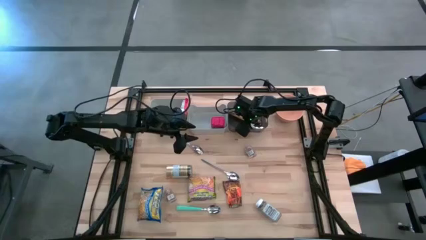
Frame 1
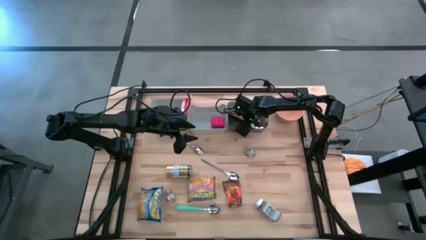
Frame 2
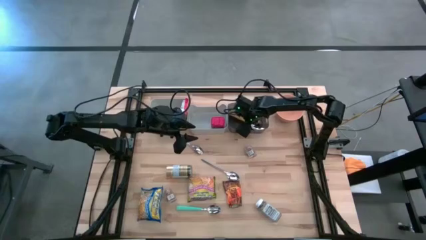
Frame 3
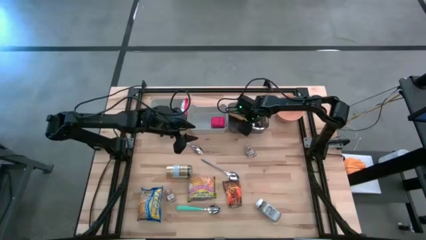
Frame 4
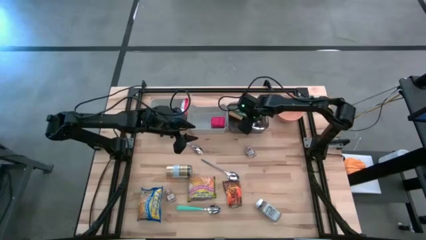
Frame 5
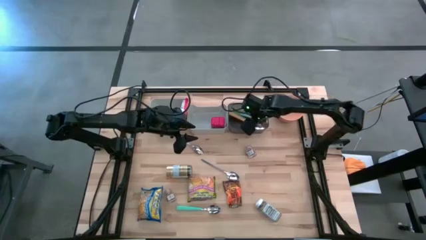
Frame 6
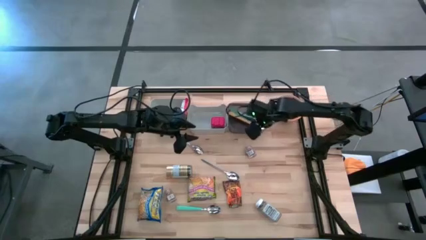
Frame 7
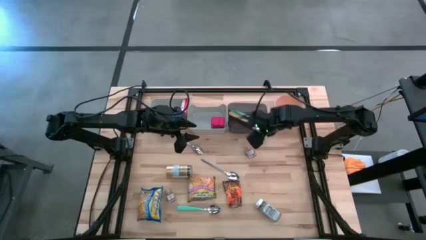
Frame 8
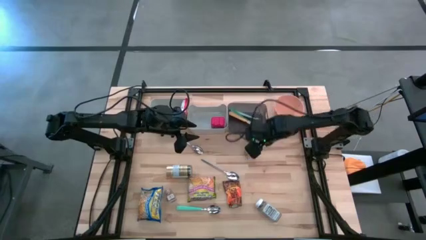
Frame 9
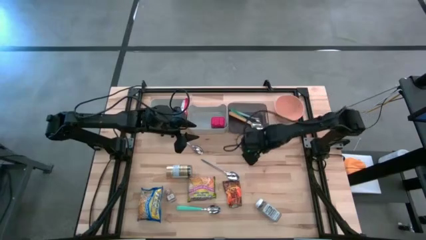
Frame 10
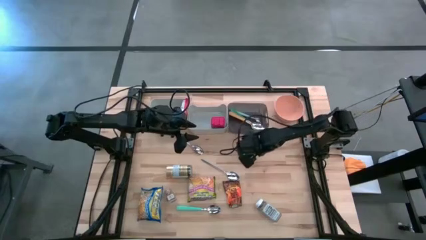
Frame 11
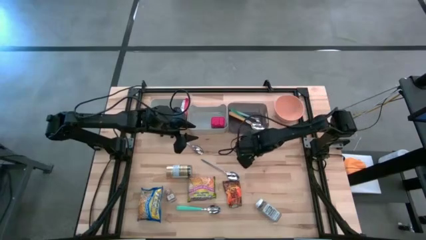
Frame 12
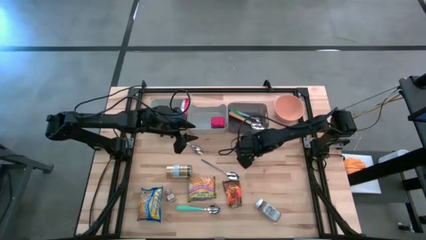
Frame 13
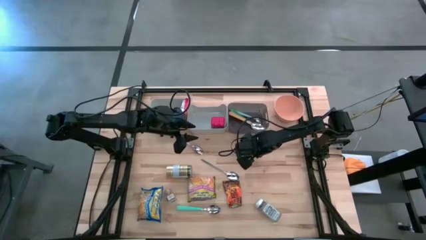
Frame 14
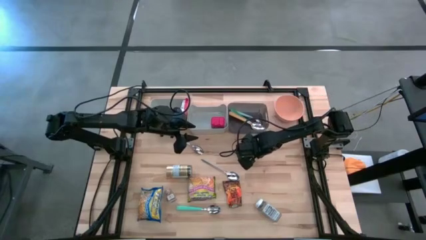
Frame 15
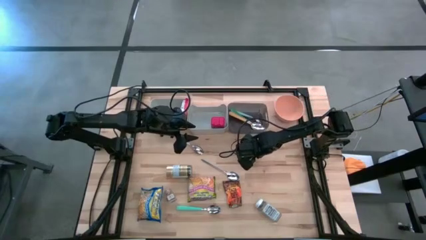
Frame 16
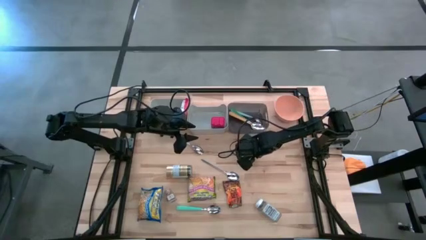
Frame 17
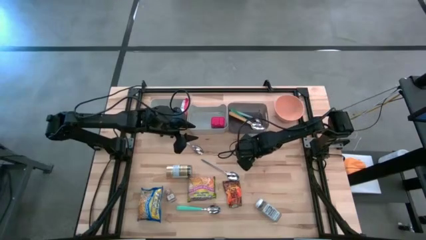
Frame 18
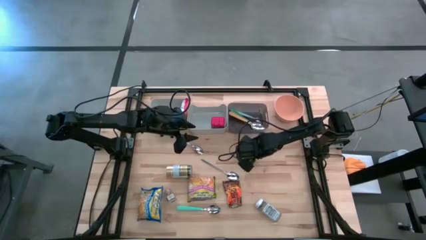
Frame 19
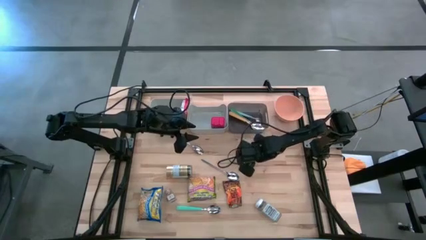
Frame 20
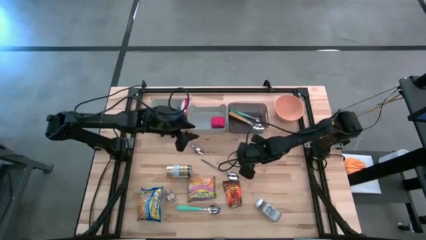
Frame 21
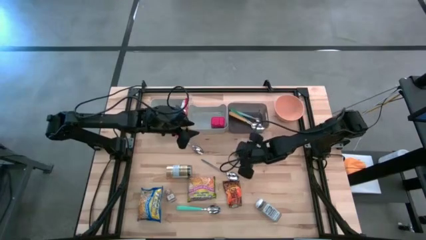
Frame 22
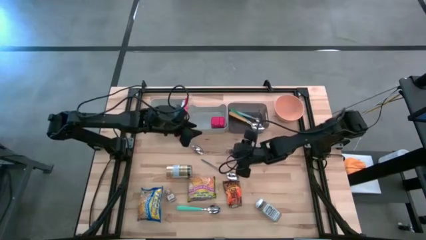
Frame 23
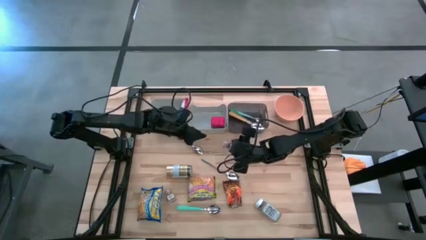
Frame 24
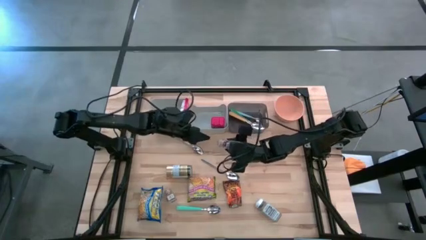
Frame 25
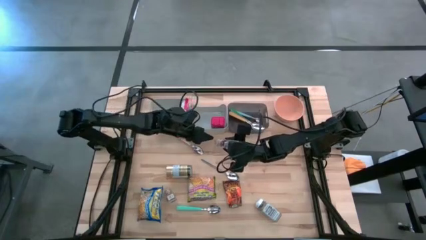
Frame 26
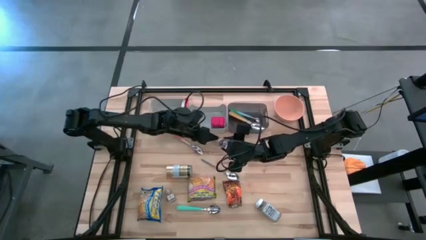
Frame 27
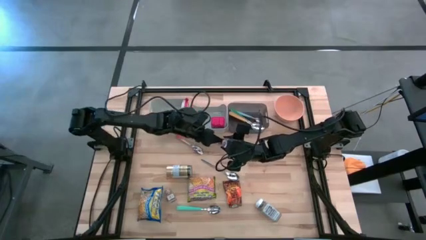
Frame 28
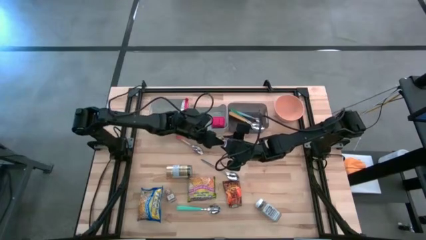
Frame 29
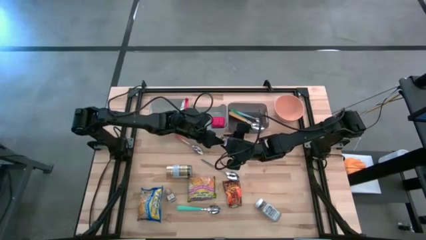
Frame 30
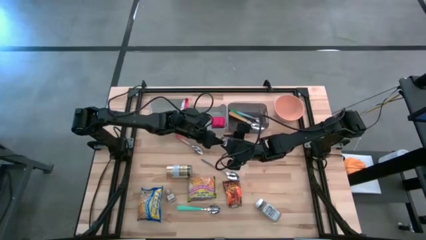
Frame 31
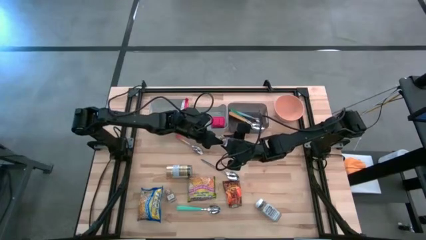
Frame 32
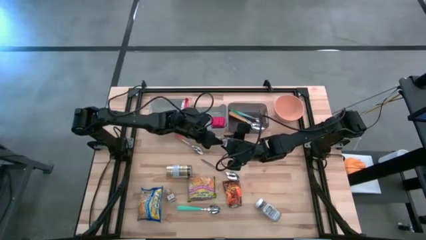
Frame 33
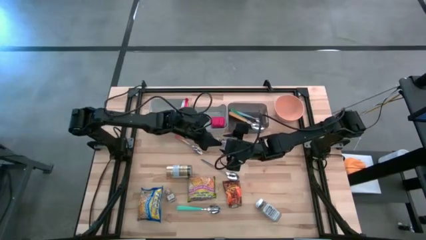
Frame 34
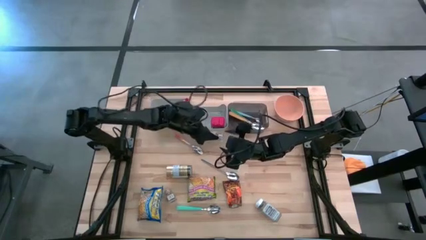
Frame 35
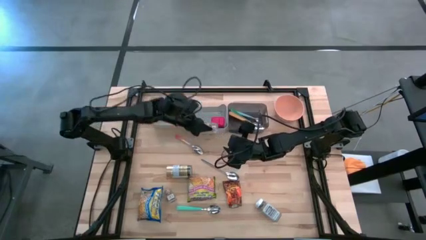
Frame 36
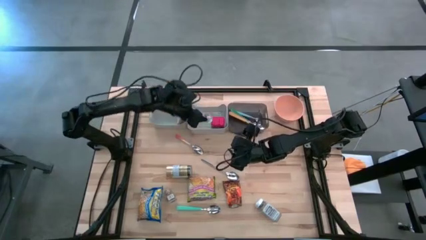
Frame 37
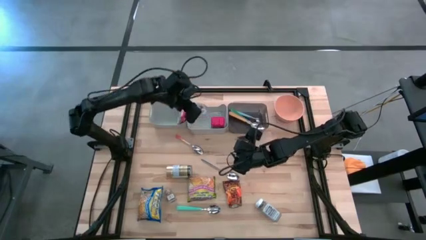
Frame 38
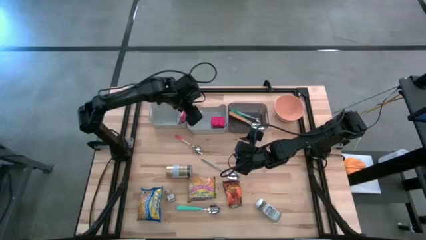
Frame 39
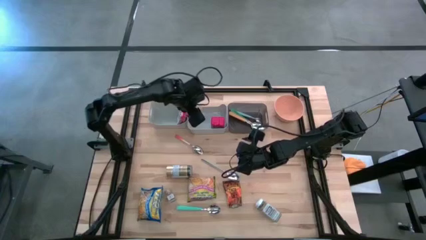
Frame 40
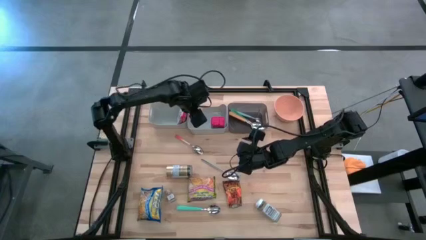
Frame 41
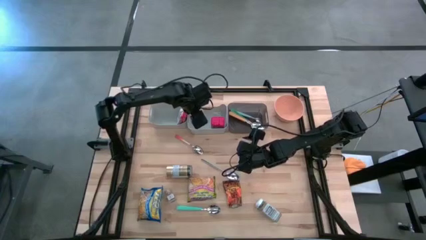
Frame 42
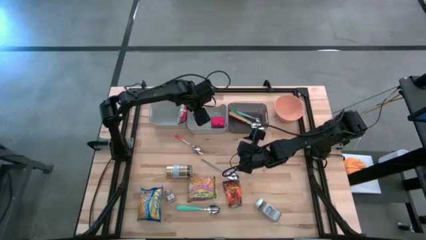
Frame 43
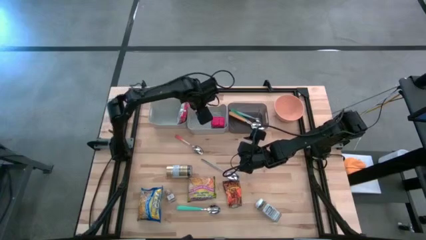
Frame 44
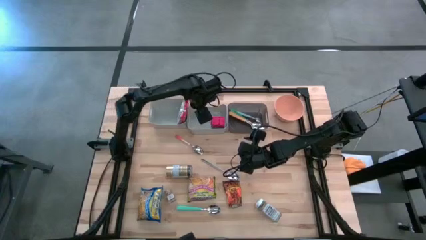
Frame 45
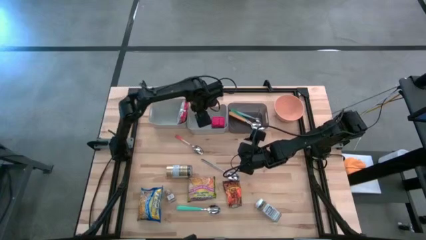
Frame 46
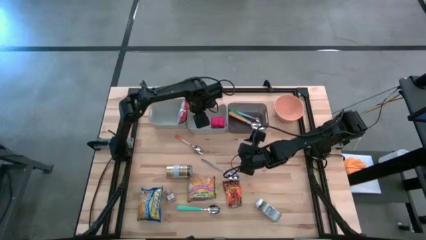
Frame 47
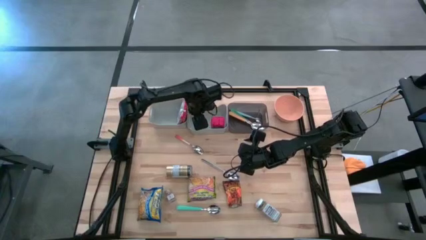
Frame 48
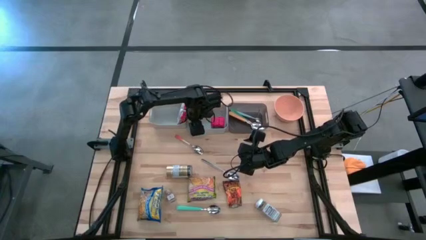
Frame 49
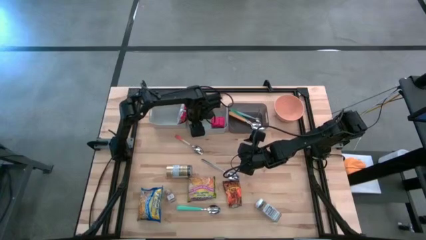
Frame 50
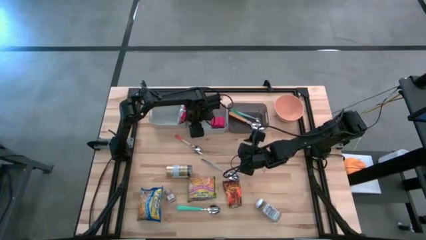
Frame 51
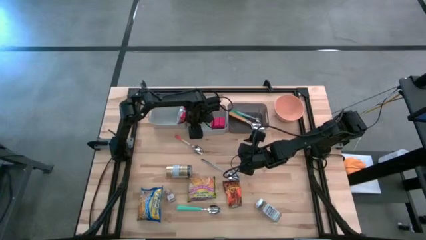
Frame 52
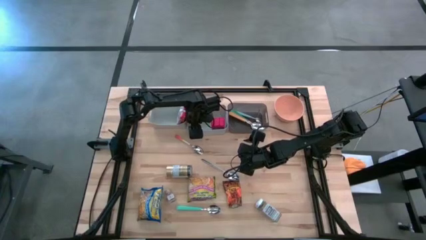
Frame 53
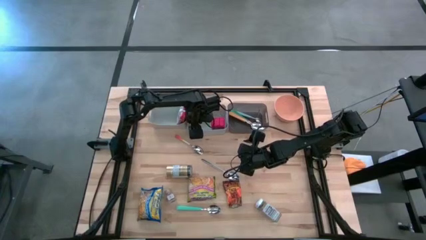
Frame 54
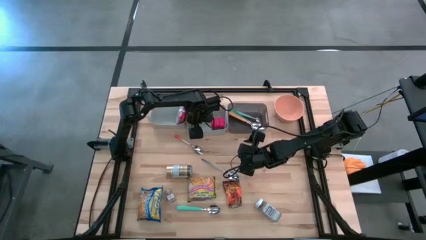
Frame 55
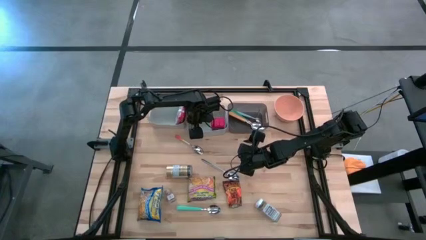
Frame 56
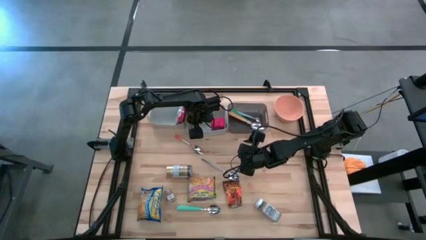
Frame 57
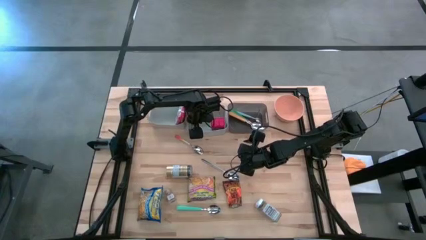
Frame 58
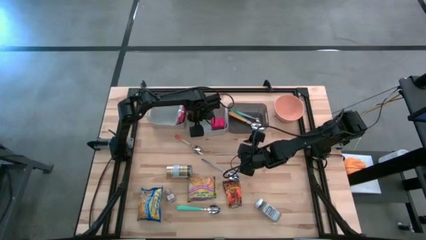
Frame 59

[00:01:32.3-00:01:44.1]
Put the top brown seasoning bottle into the right gray bin
